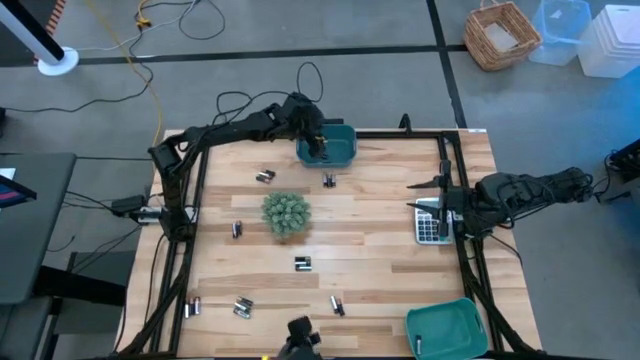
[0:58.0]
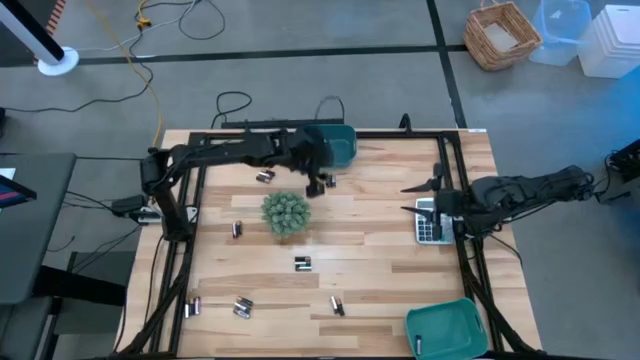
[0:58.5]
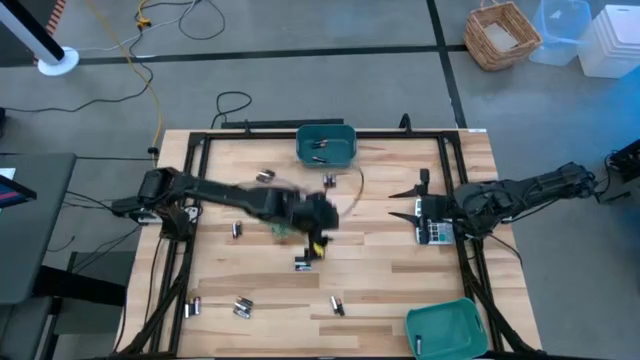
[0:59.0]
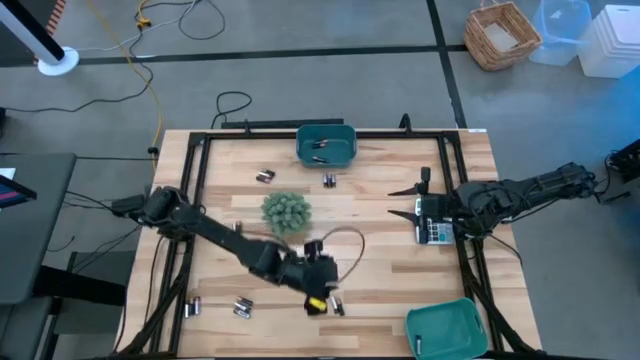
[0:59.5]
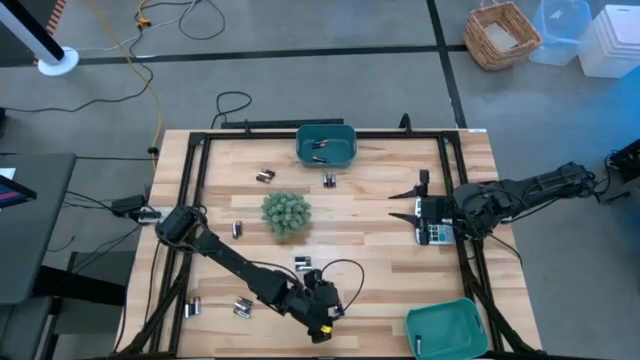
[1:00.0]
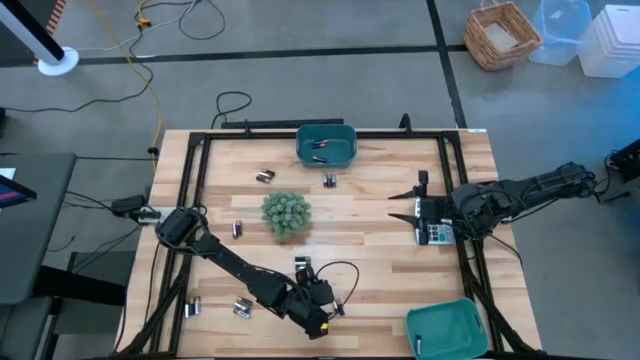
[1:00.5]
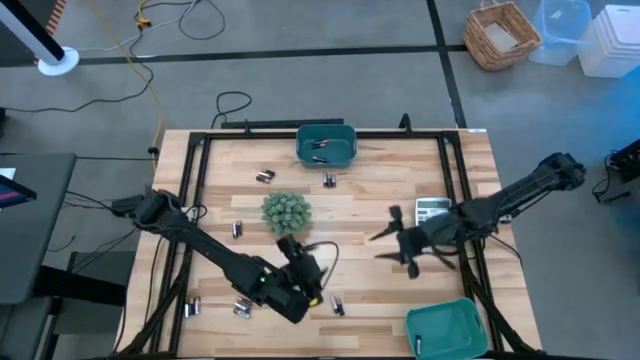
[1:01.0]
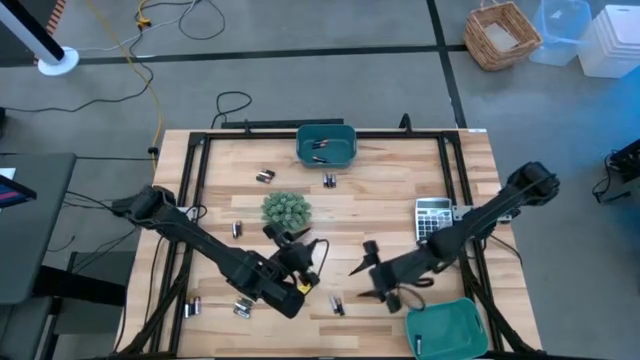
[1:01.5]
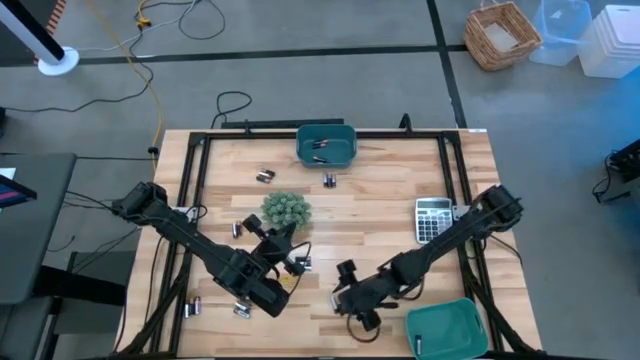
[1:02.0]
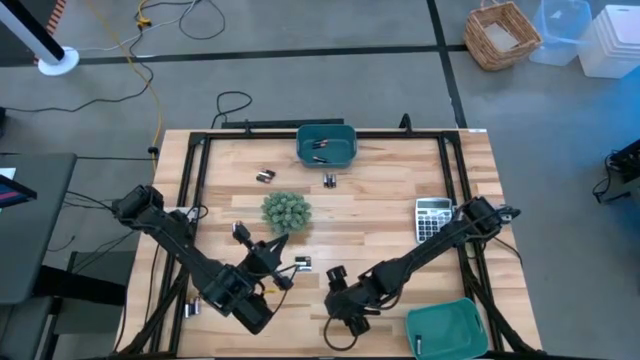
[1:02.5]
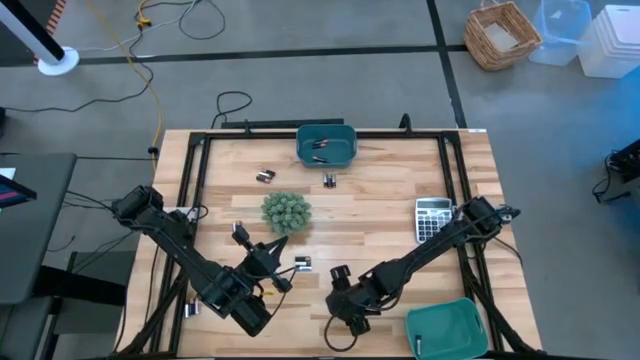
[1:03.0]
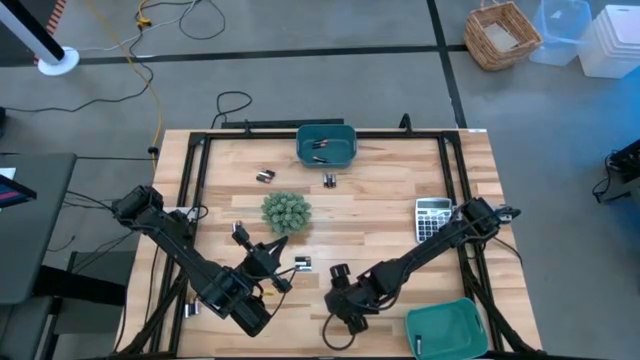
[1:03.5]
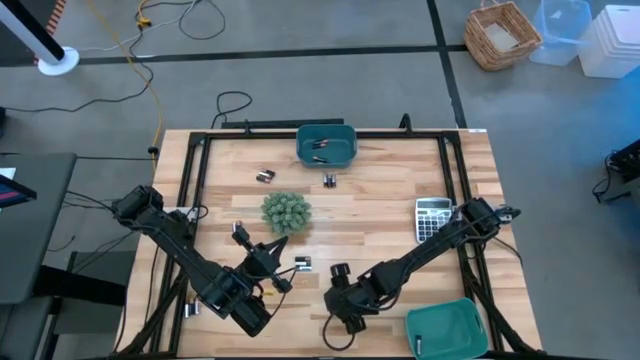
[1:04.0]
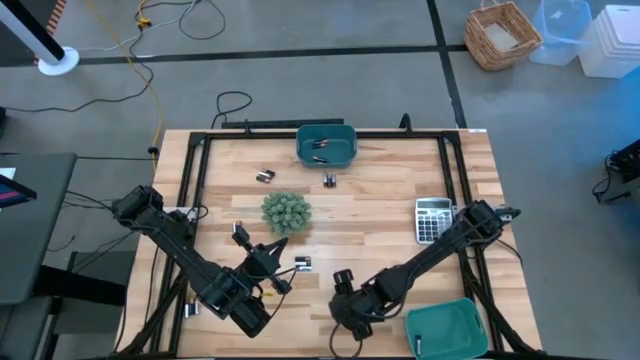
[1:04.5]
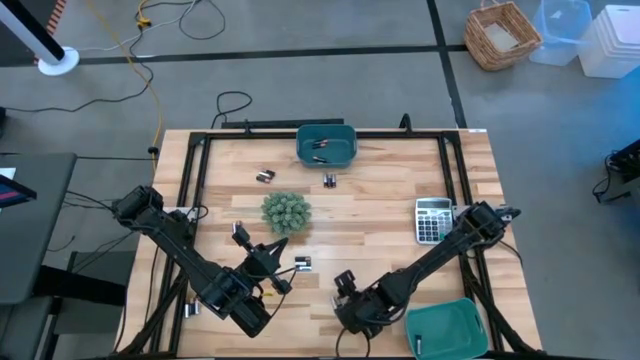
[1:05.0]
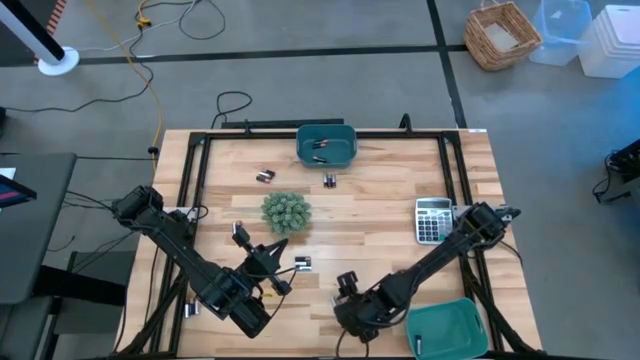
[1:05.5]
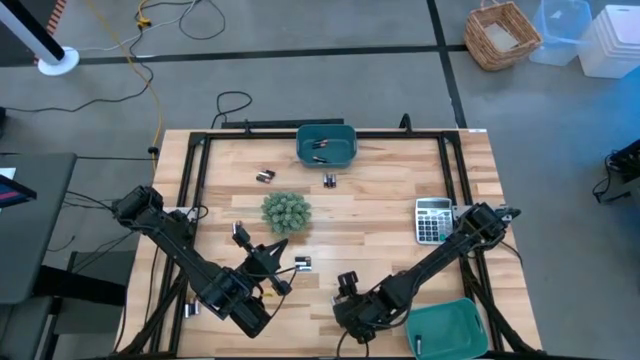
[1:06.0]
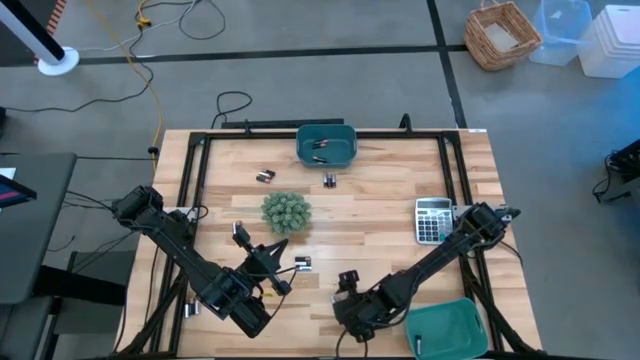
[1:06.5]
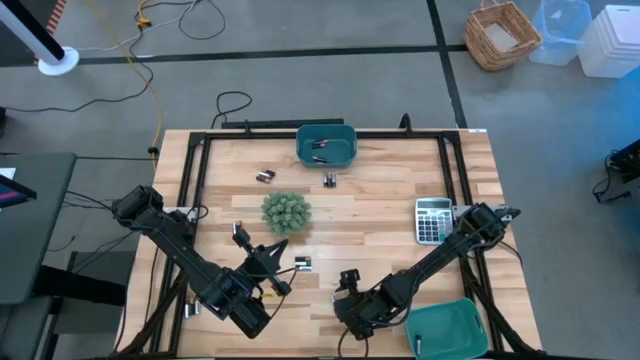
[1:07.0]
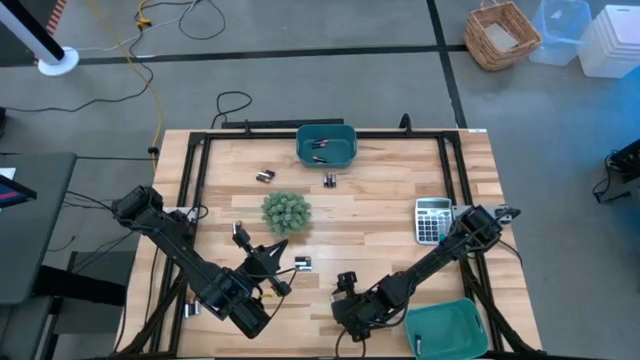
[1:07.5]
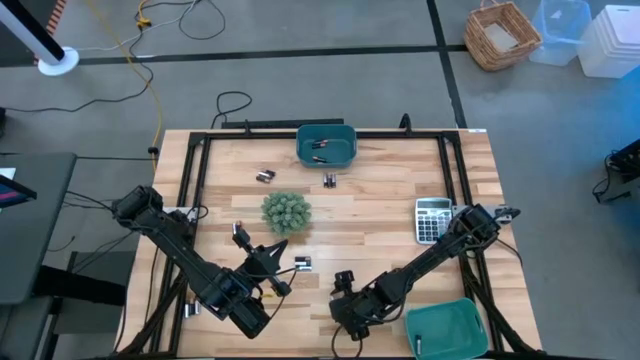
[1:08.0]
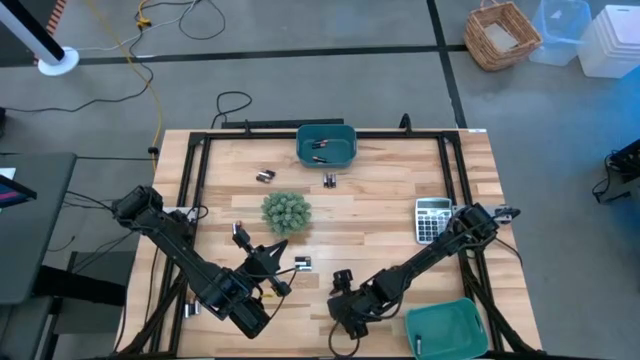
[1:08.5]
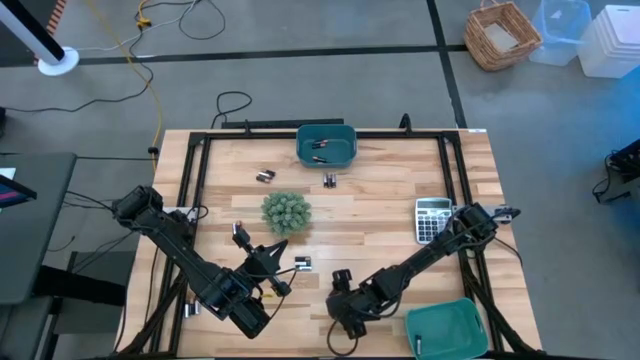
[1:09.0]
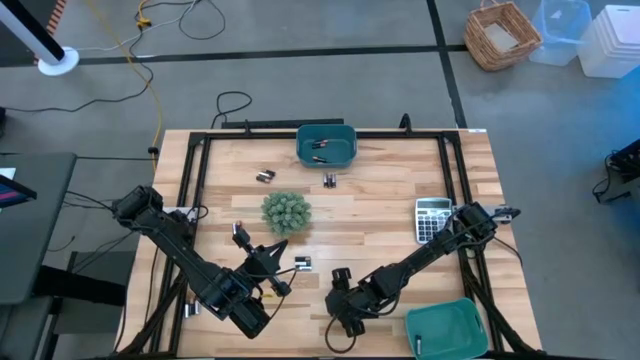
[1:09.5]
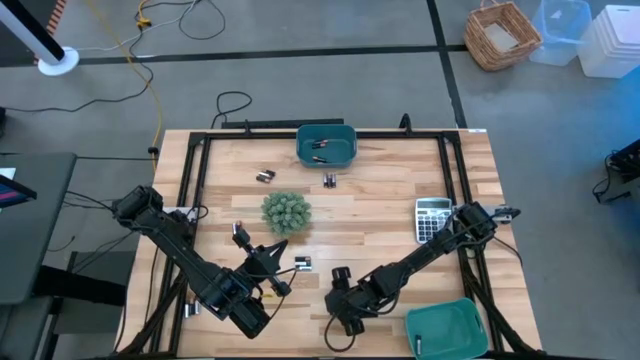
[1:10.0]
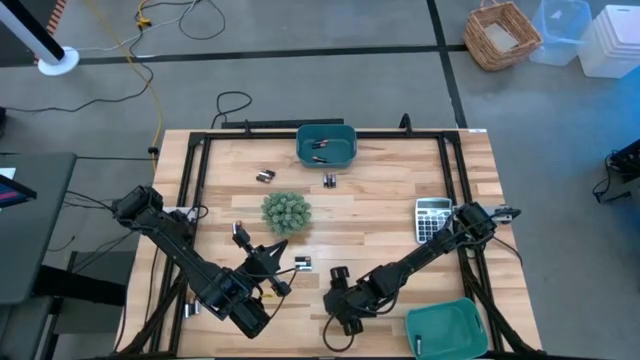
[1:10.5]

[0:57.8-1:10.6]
Task: Sort batteries
Put the silver battery into the green bin

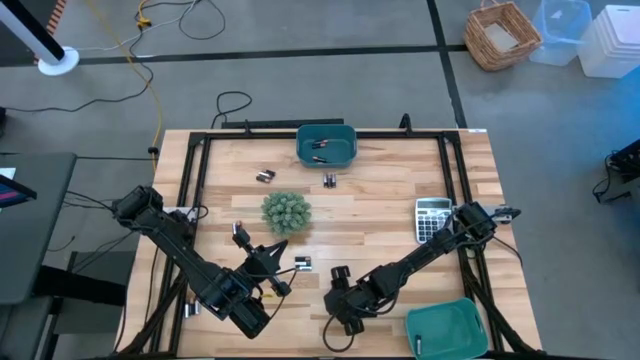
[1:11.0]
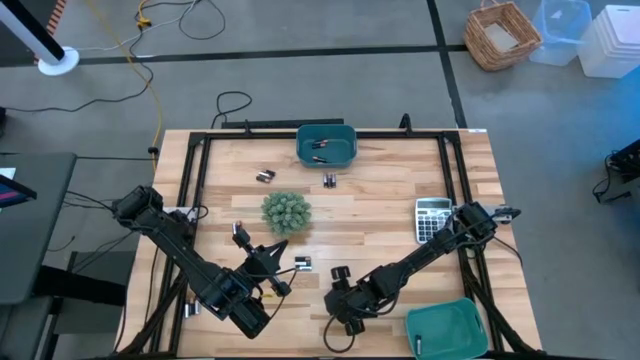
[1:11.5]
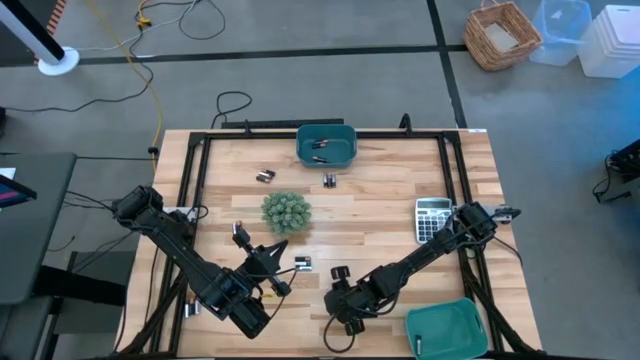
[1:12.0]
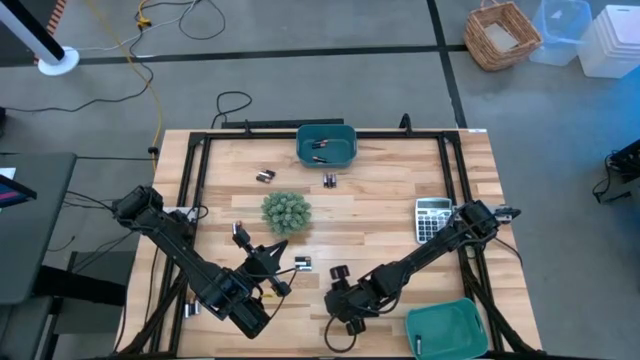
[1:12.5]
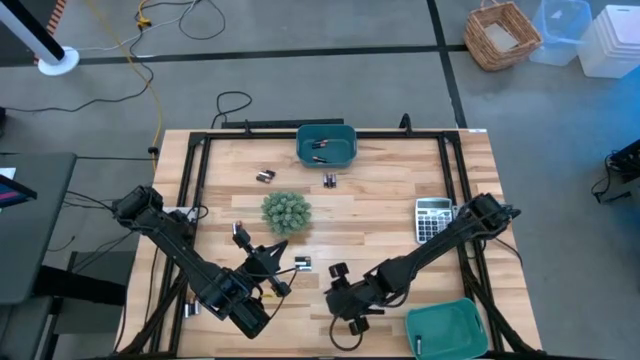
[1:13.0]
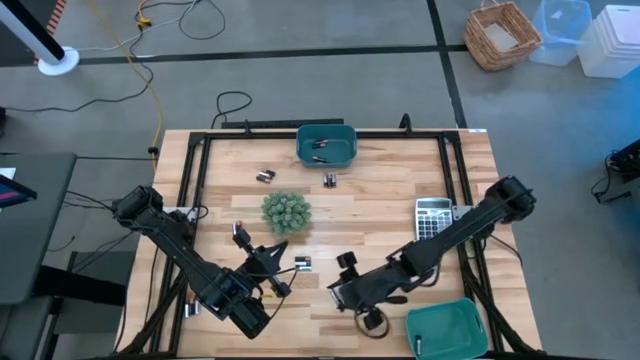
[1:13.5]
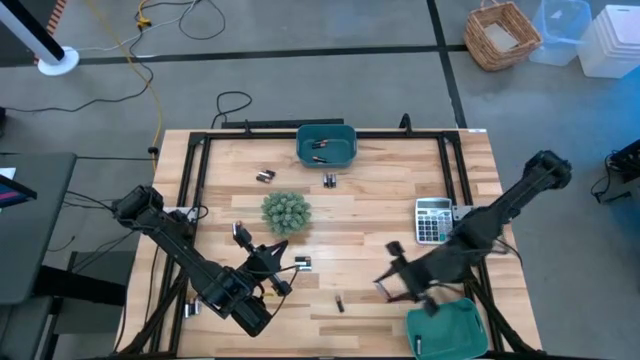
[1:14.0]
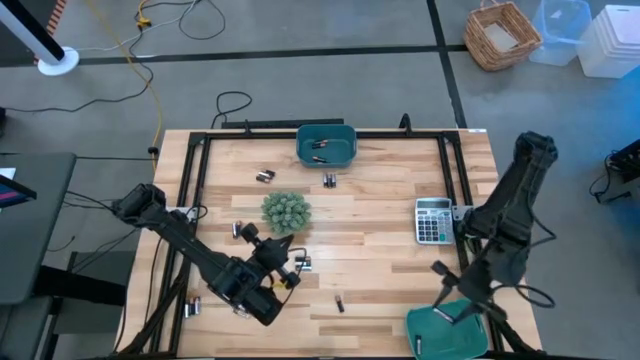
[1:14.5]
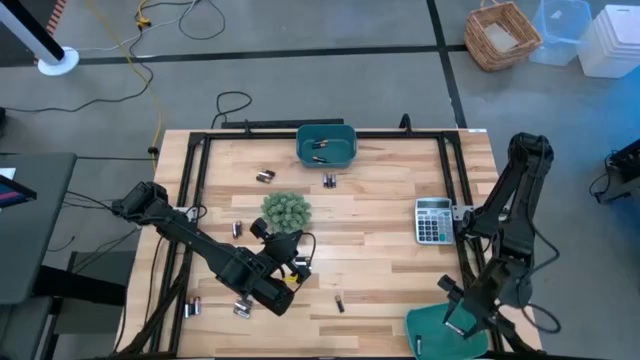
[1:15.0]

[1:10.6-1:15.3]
Put the silver battery into the green bin

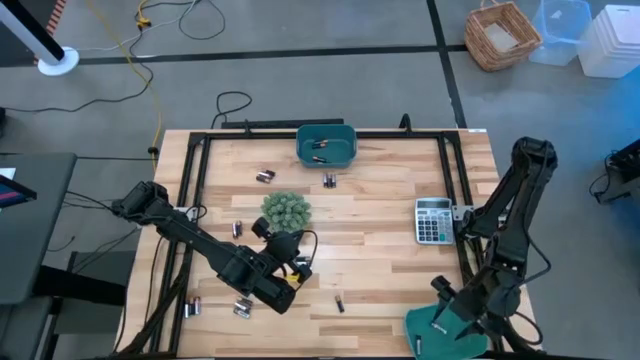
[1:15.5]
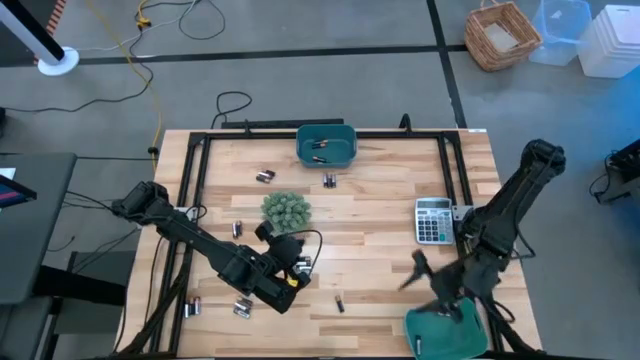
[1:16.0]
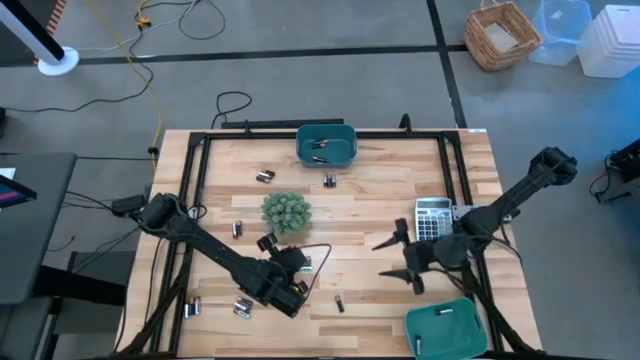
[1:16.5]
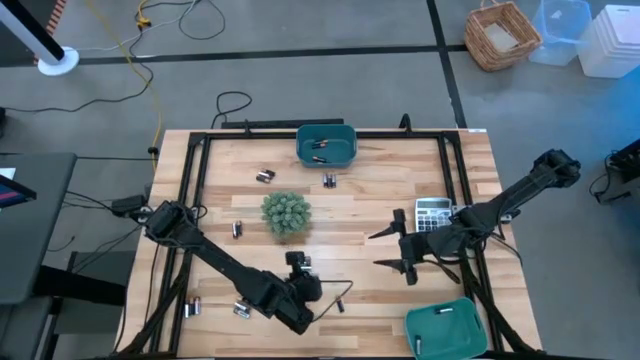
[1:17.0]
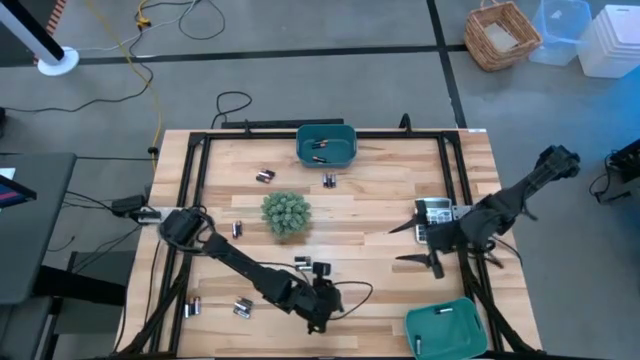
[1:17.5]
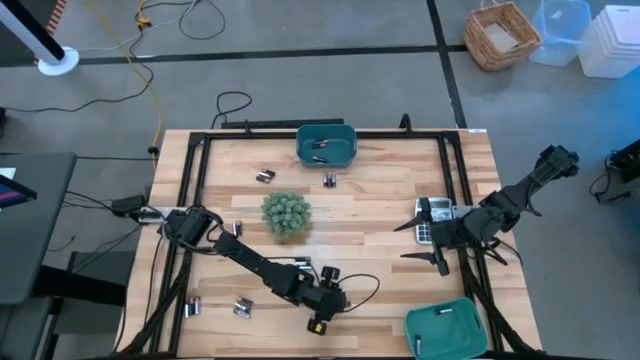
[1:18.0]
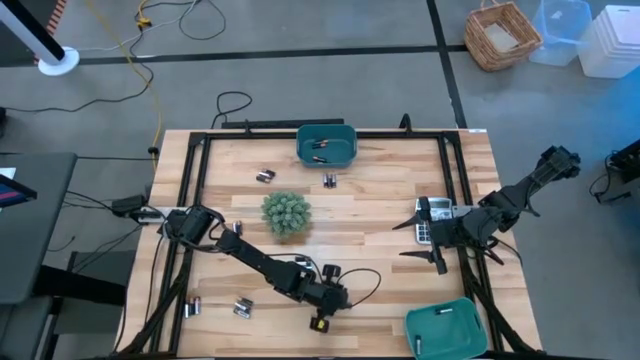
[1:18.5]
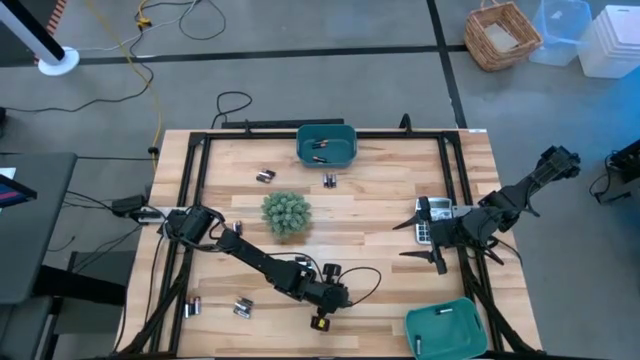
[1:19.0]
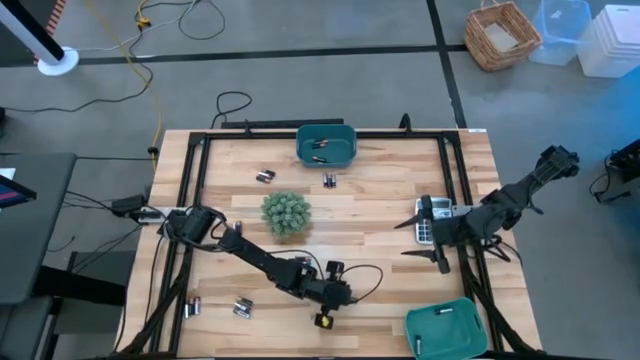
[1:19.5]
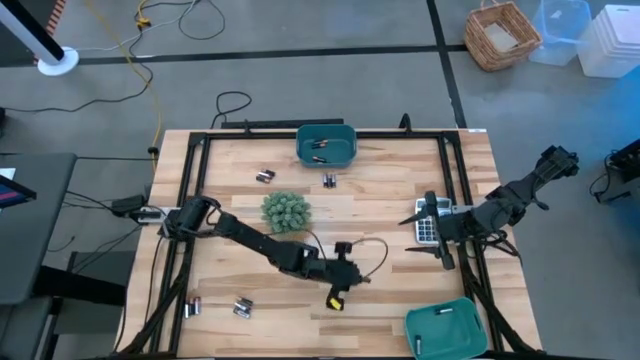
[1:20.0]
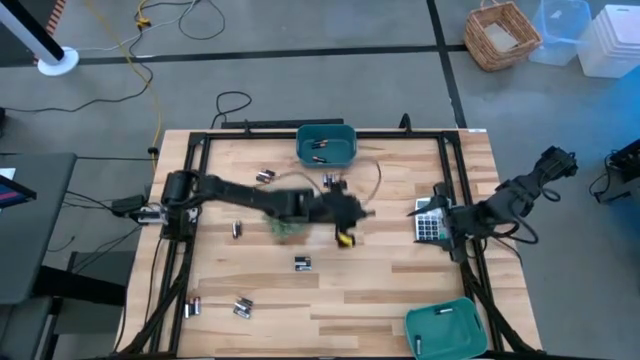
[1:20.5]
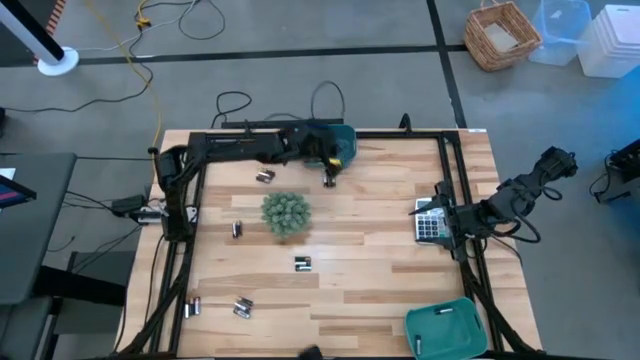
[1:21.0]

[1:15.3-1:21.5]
Put the black battery into the blue bin
